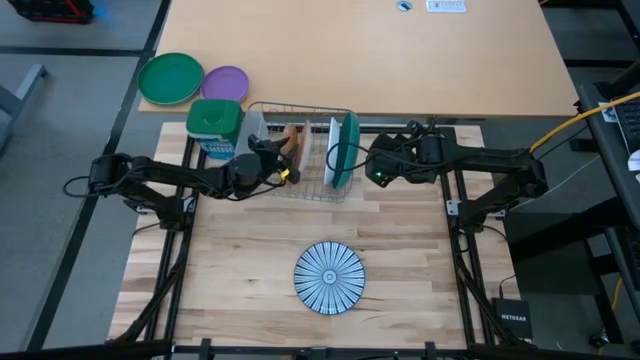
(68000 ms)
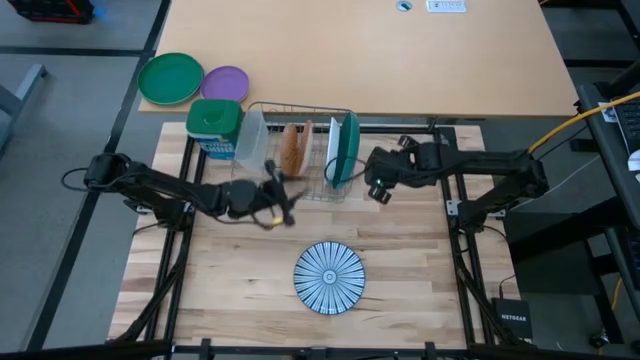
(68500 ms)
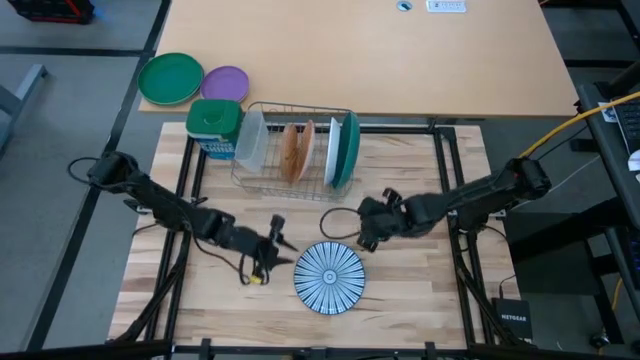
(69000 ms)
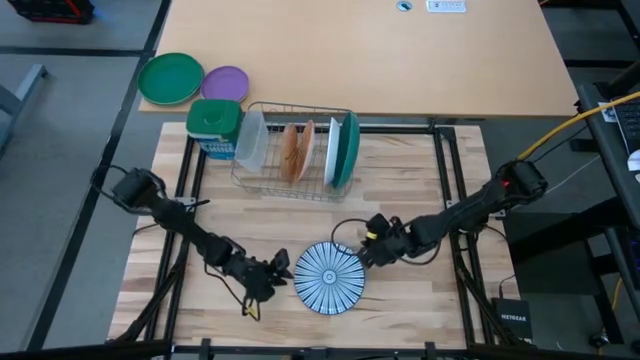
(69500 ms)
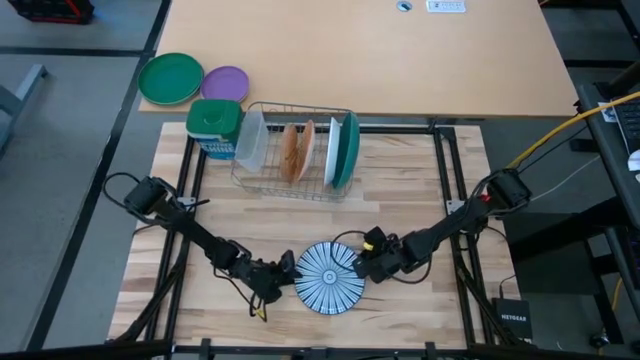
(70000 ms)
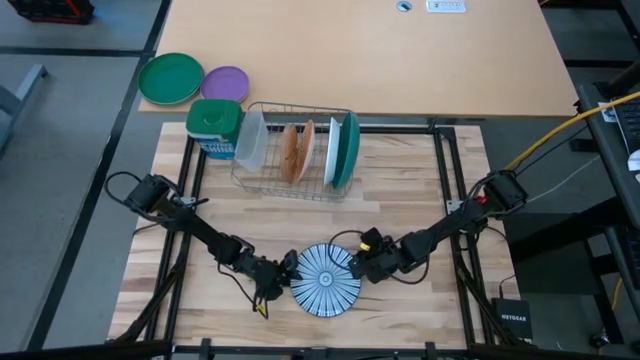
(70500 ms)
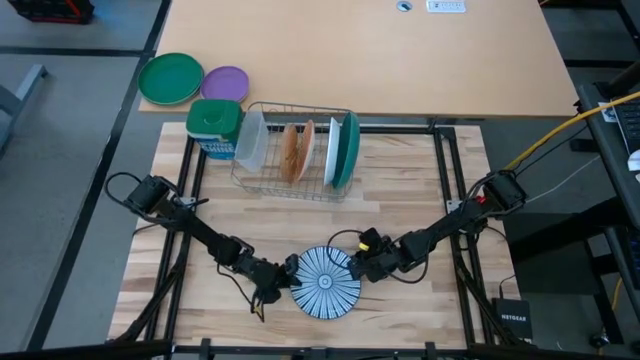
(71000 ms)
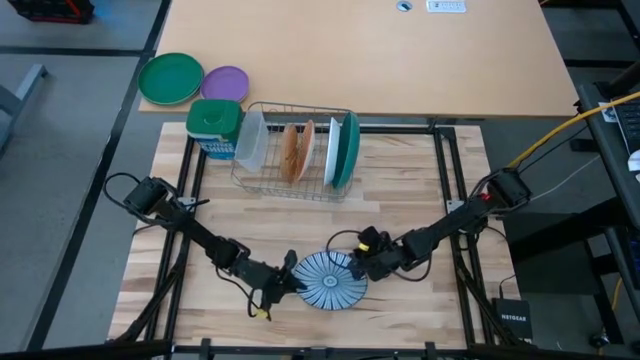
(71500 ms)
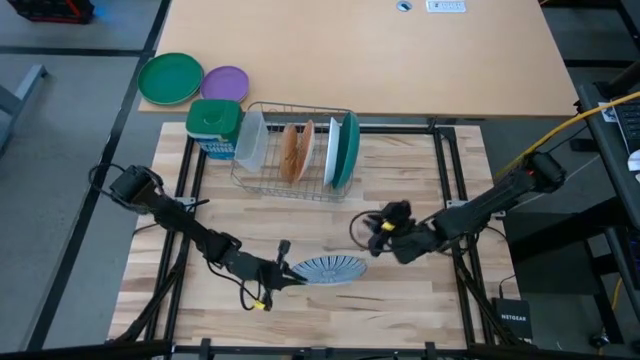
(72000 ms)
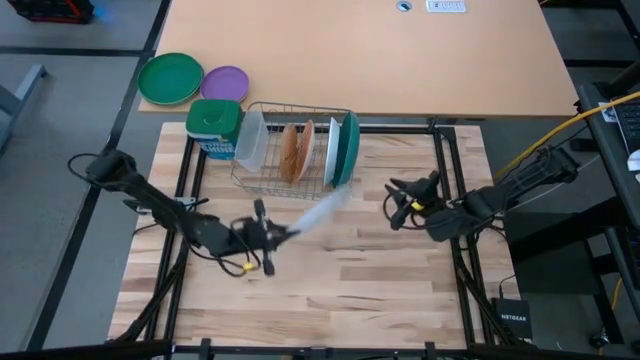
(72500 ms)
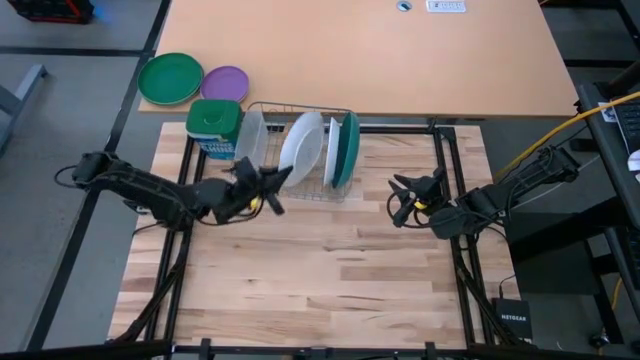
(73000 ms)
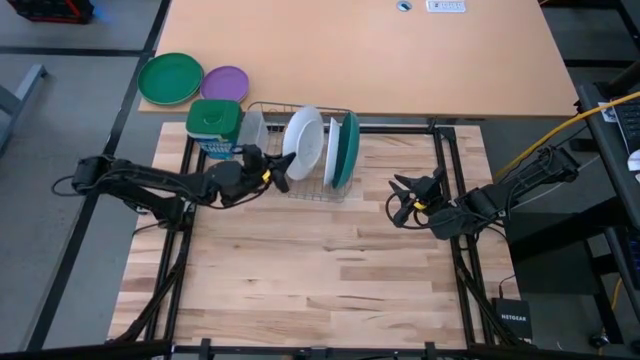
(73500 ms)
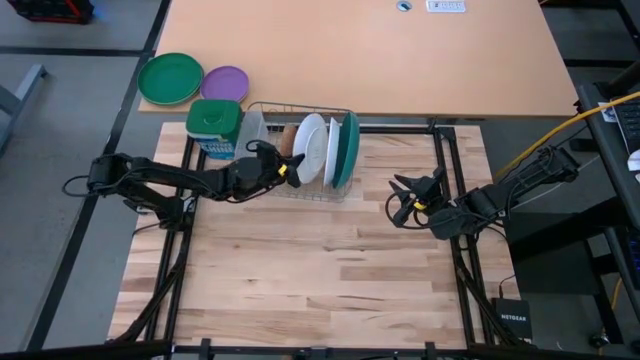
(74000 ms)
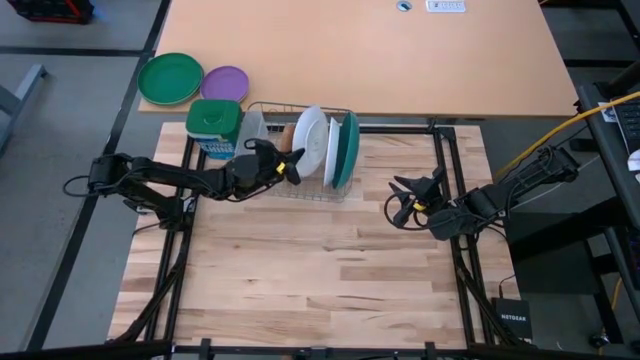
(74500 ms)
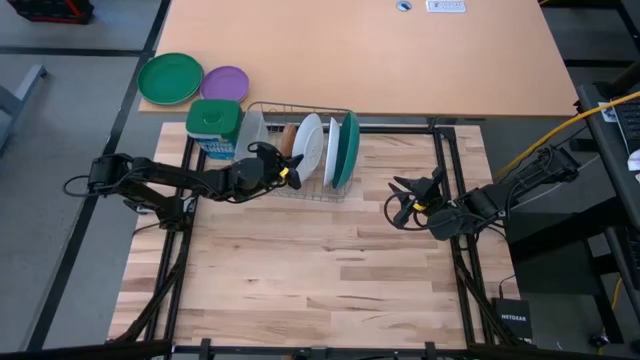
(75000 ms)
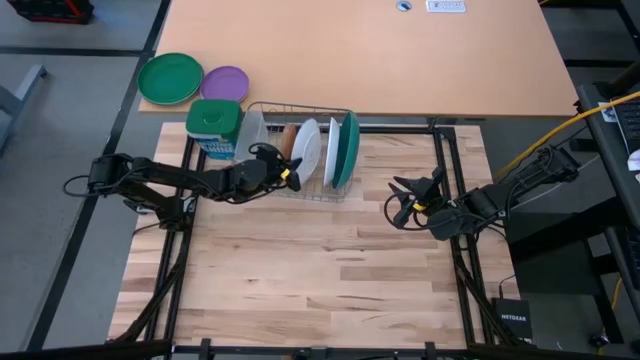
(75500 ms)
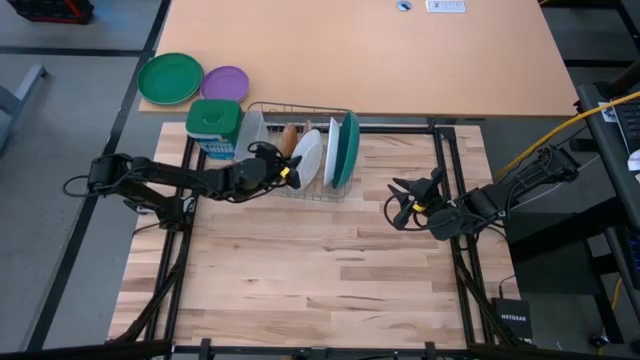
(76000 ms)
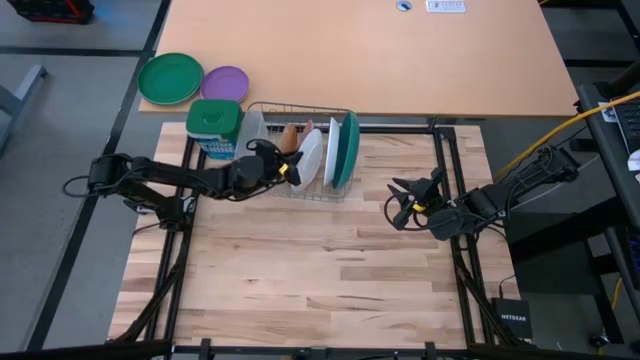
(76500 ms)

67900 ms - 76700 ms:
Task: Sort dishes
Put the blue patterned plate in the dish rack

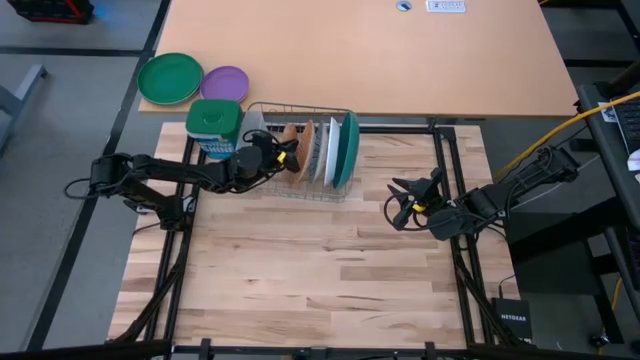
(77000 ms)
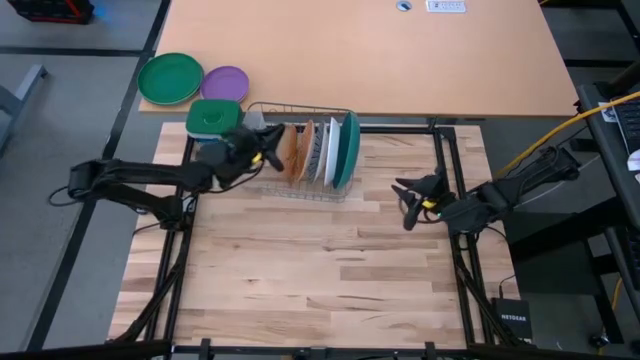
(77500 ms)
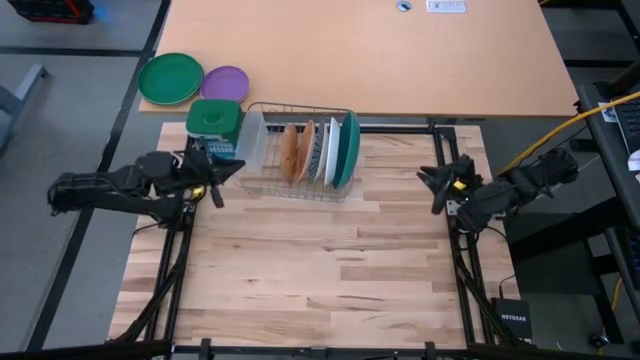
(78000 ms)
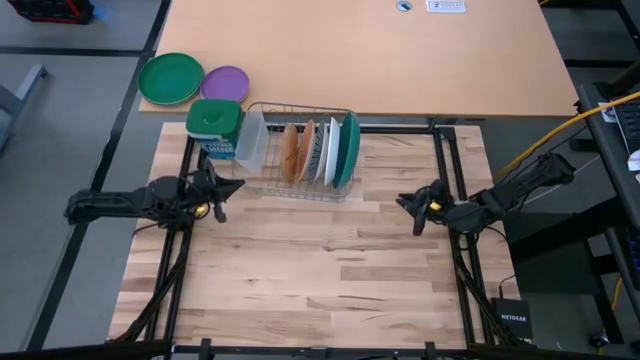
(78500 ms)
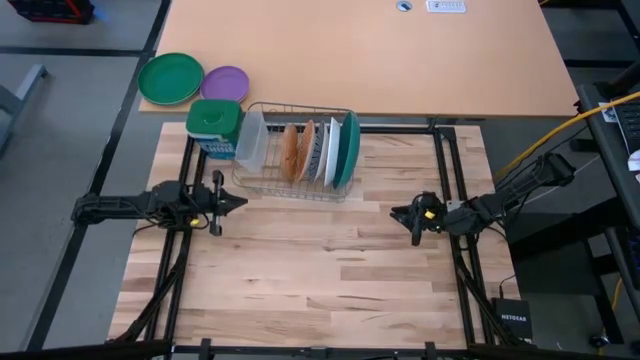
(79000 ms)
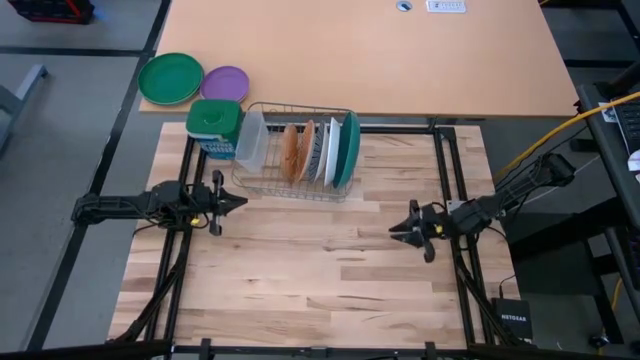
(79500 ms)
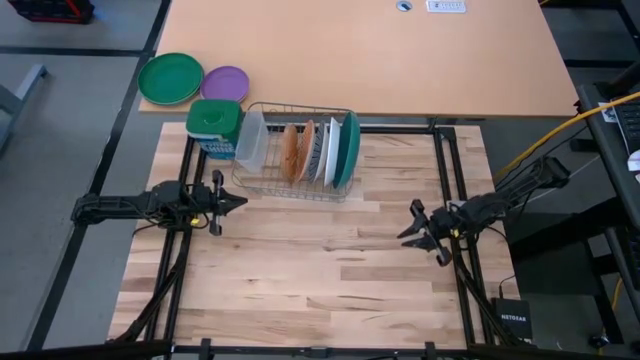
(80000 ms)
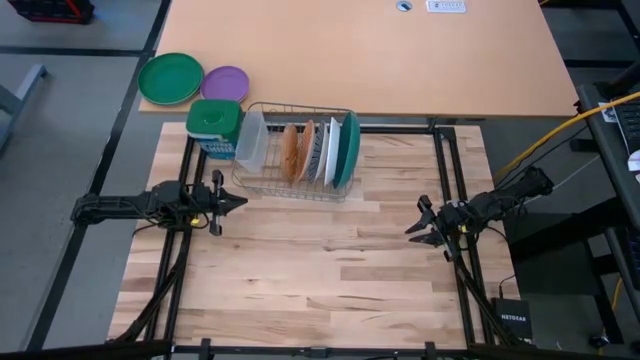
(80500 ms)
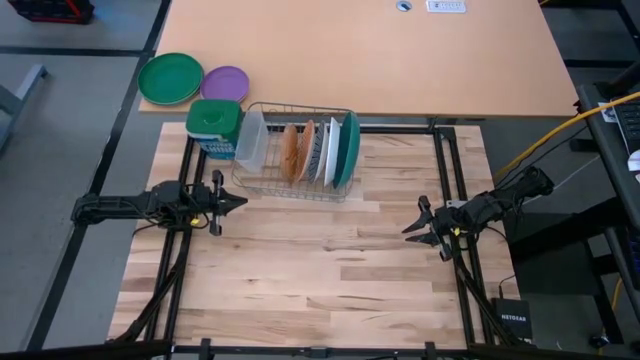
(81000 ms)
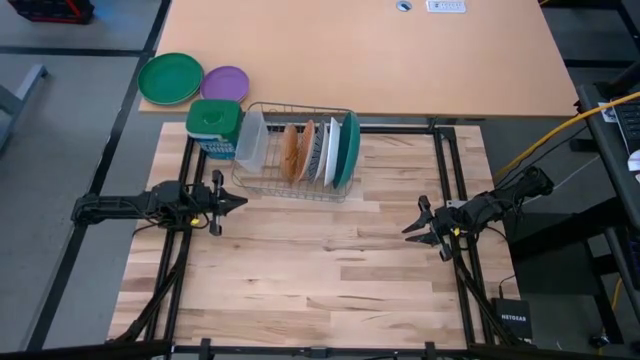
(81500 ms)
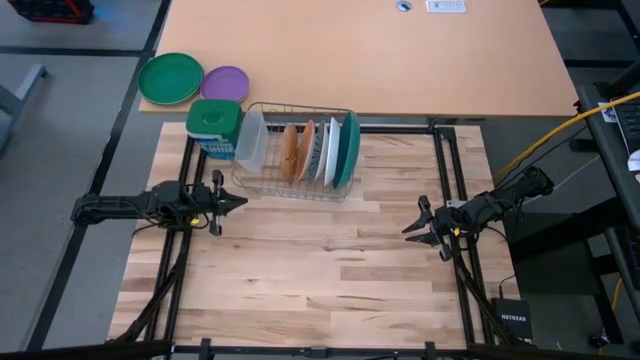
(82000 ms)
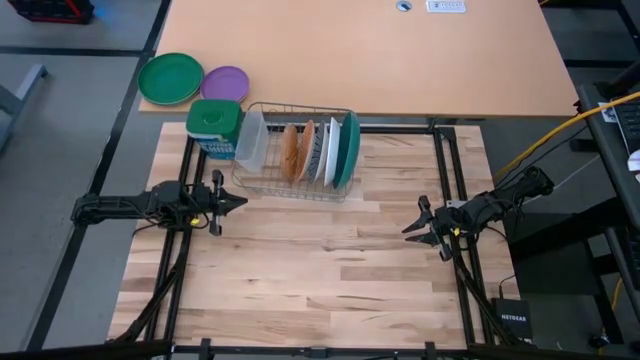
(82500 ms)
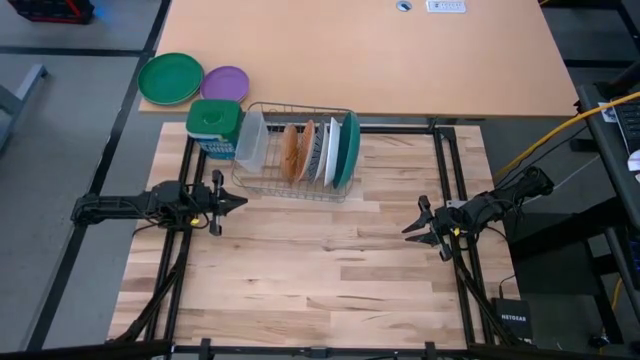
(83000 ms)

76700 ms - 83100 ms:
Return to Home Position

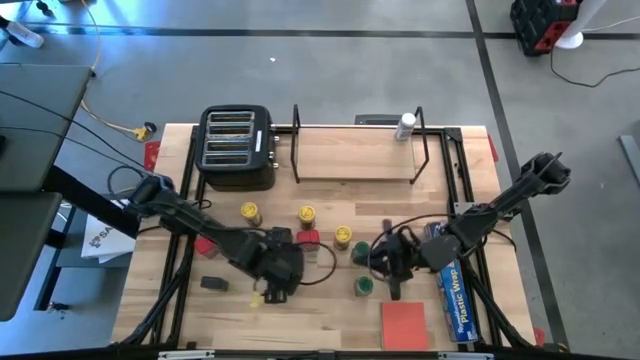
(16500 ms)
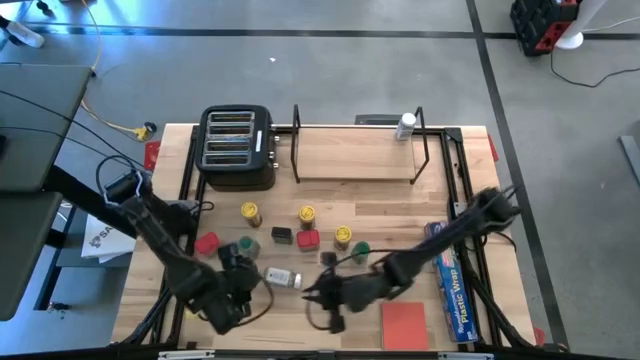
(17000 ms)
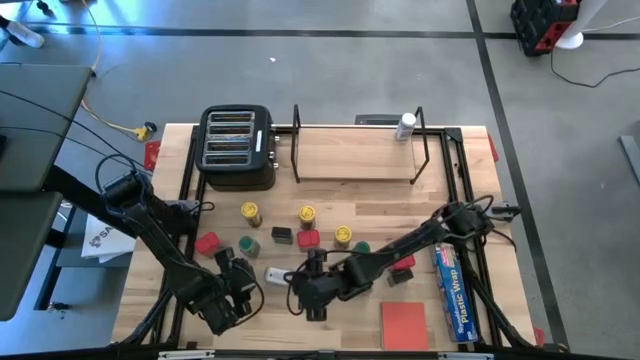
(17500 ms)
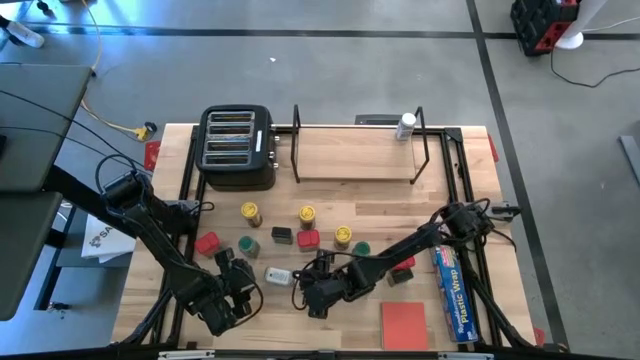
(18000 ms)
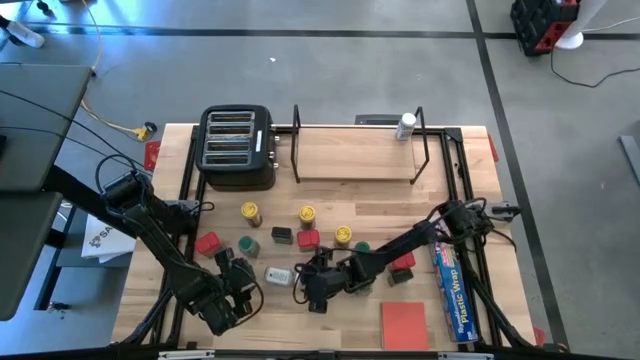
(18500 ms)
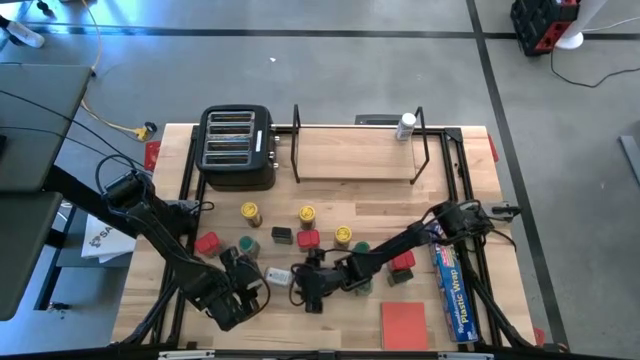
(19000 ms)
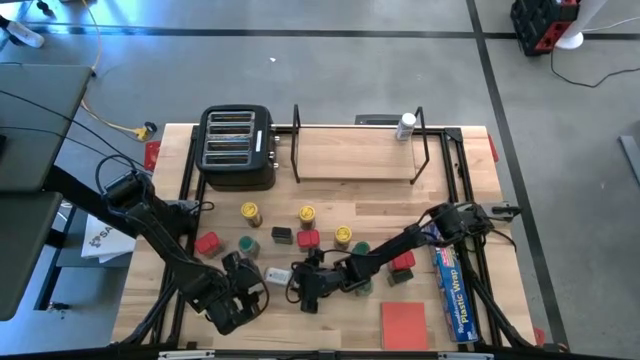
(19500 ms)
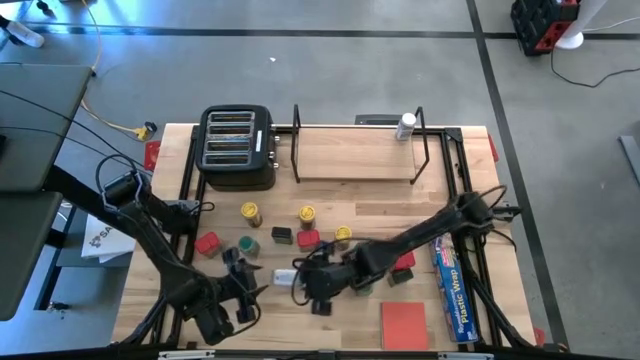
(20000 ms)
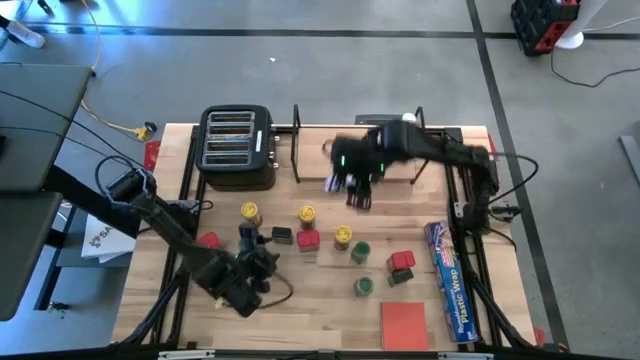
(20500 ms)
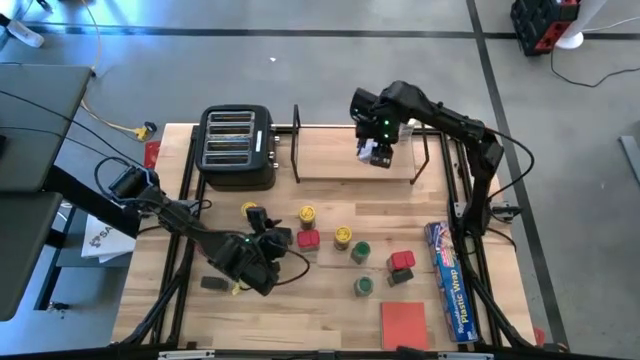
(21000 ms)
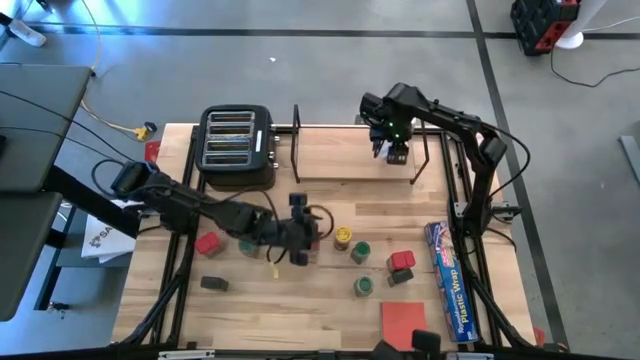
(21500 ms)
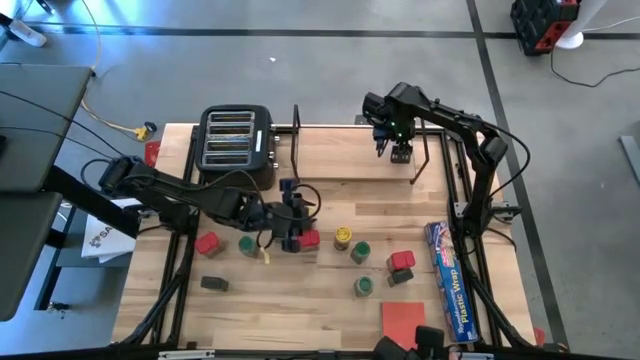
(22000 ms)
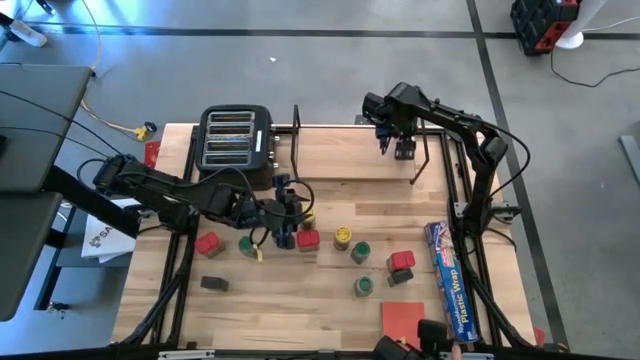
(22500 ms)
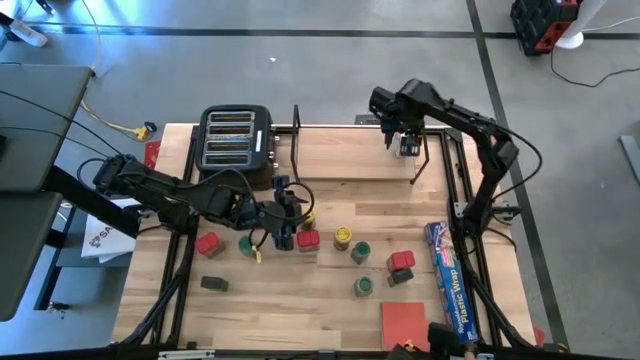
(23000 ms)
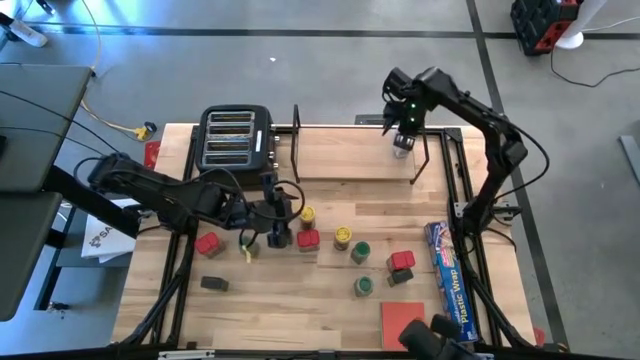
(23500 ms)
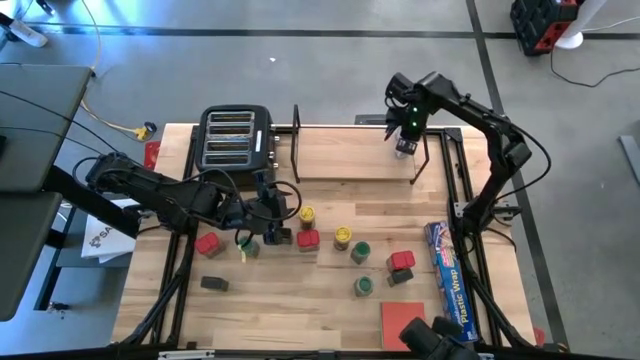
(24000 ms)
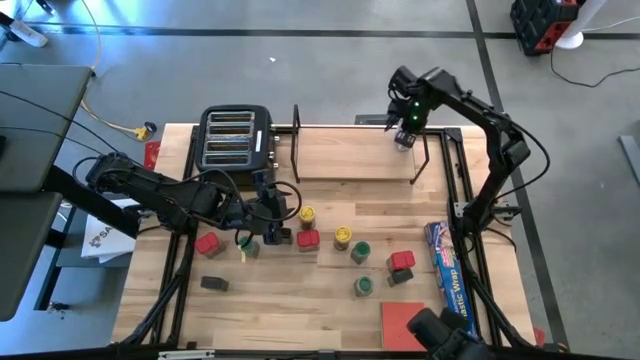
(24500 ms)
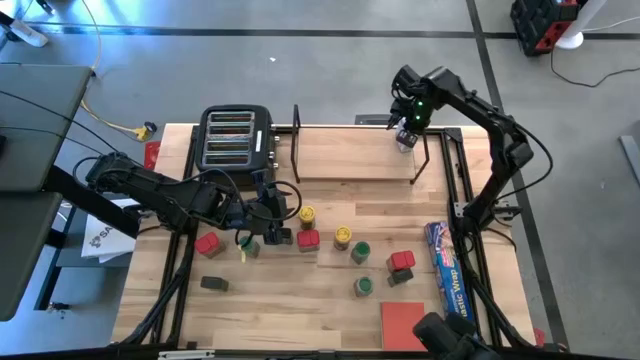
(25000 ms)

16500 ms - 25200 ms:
Task: Shelf spices
Put the white seasoning bottle on the shelf aligned with the other white seasoning bottle
